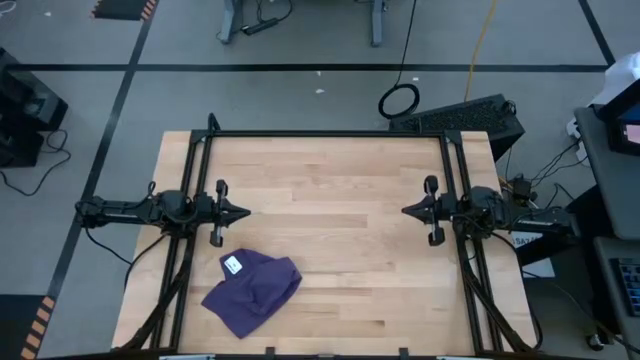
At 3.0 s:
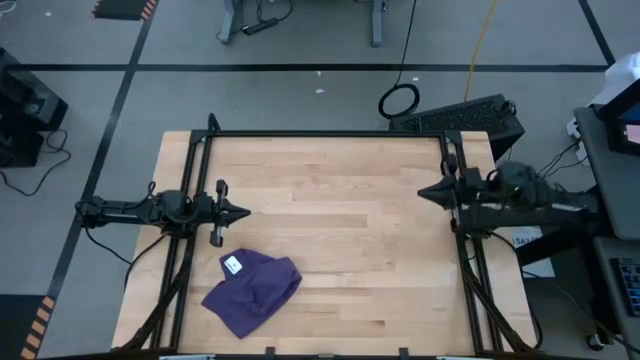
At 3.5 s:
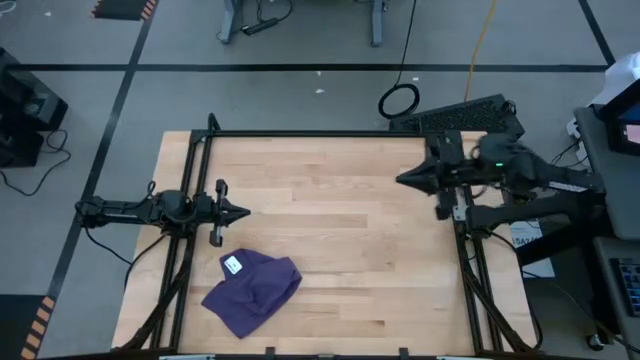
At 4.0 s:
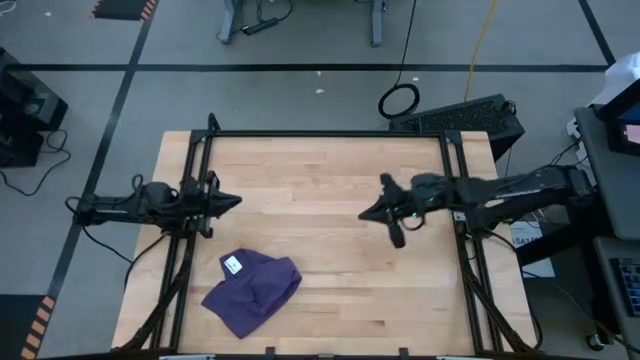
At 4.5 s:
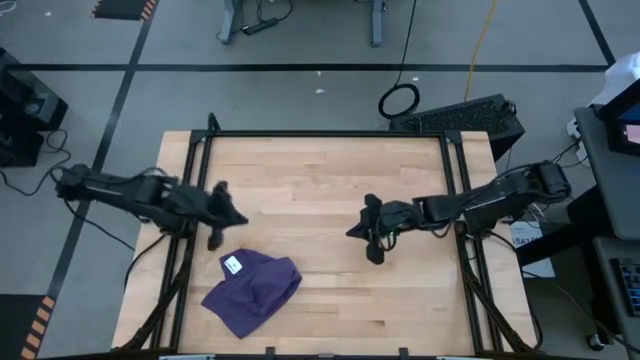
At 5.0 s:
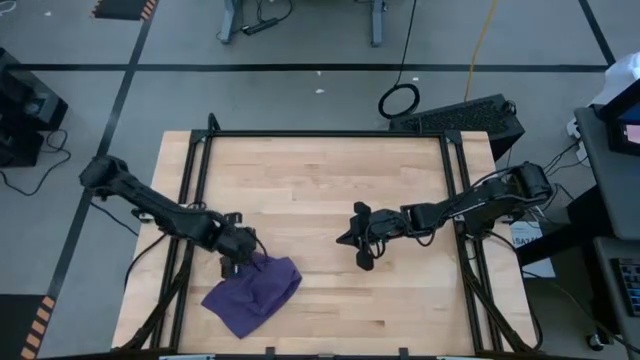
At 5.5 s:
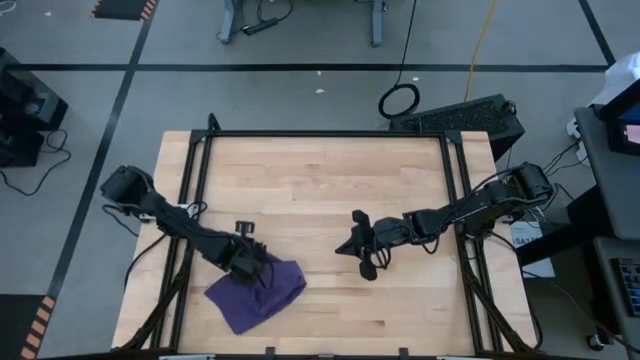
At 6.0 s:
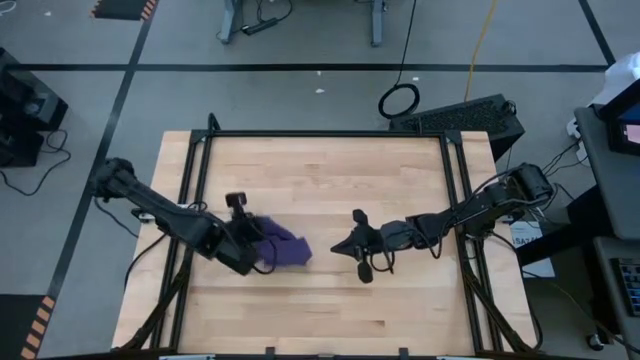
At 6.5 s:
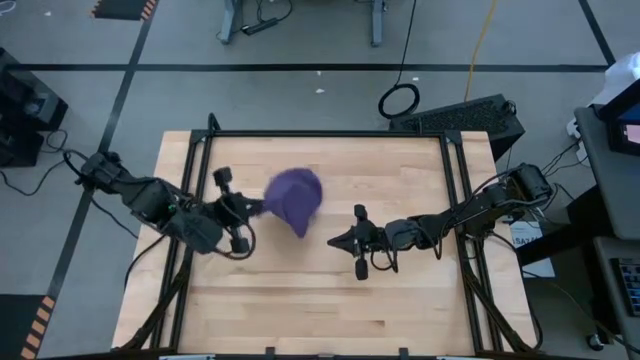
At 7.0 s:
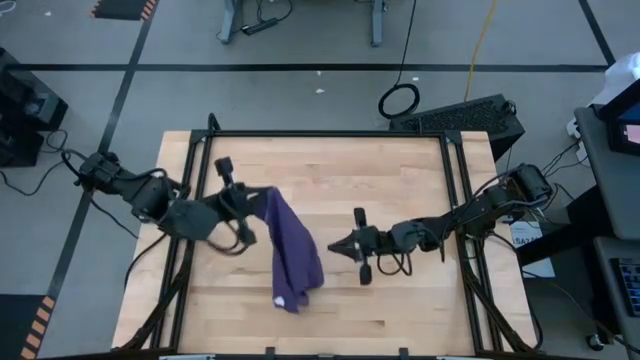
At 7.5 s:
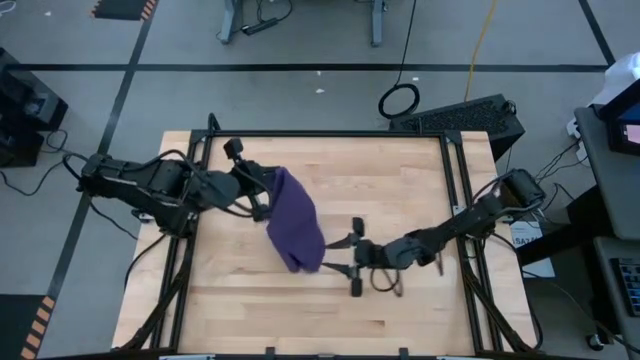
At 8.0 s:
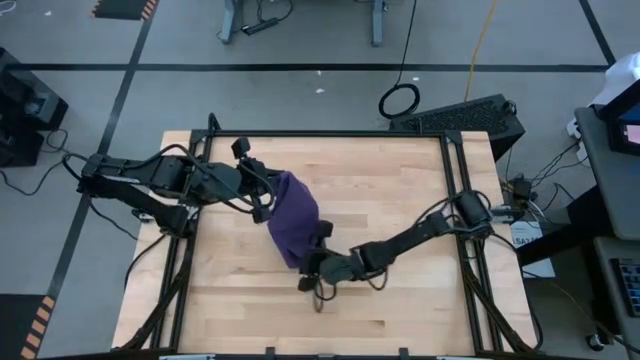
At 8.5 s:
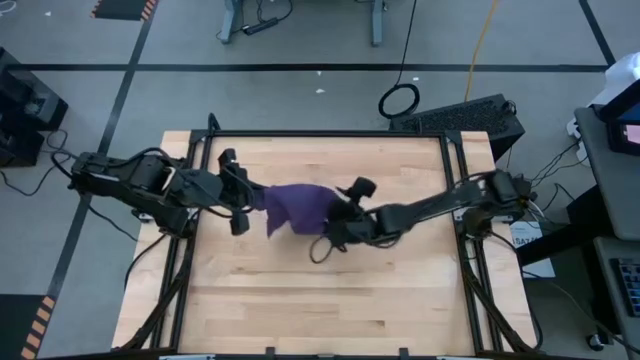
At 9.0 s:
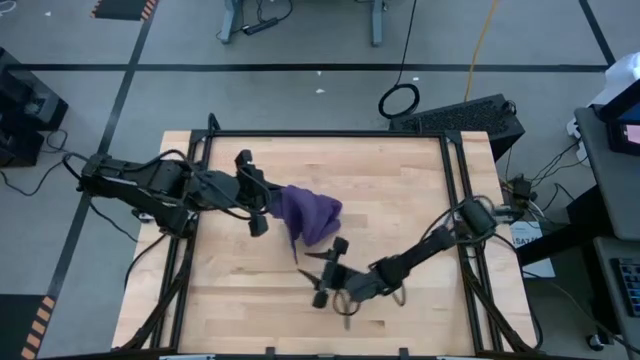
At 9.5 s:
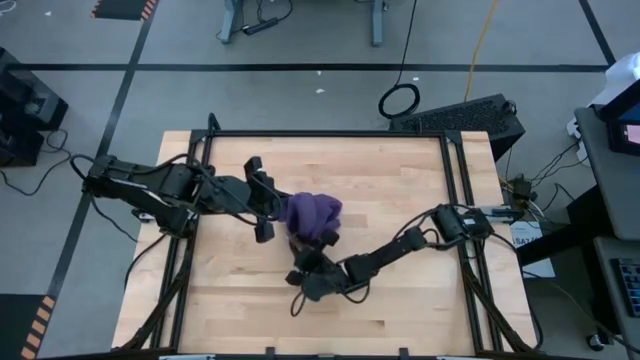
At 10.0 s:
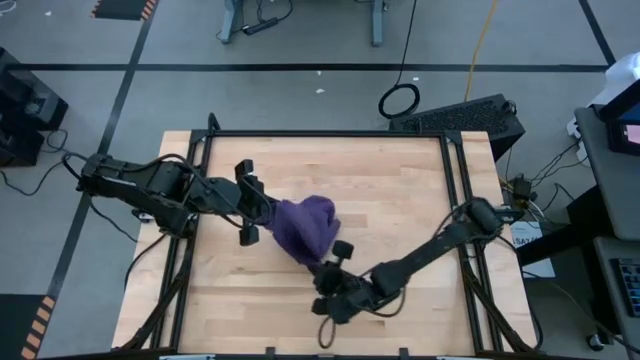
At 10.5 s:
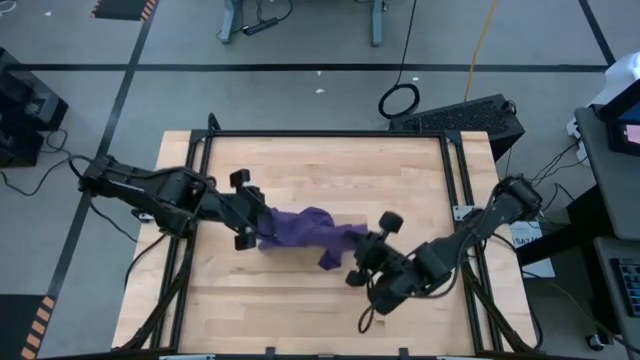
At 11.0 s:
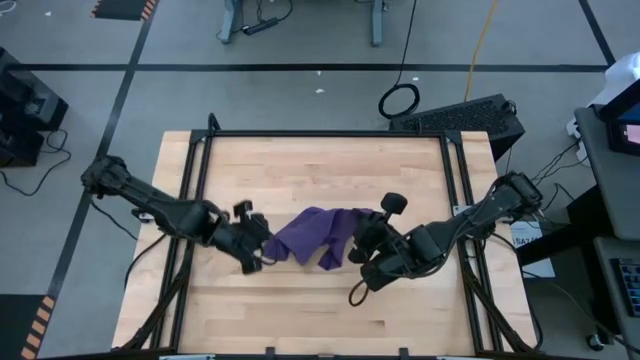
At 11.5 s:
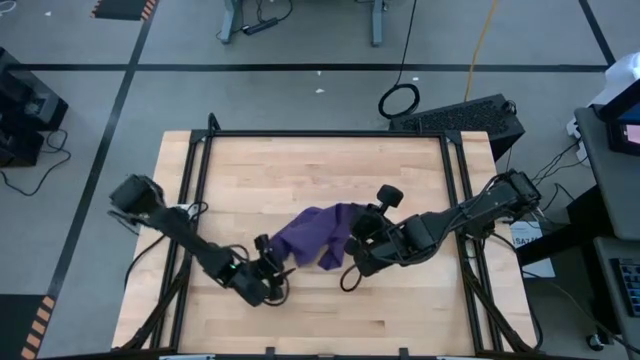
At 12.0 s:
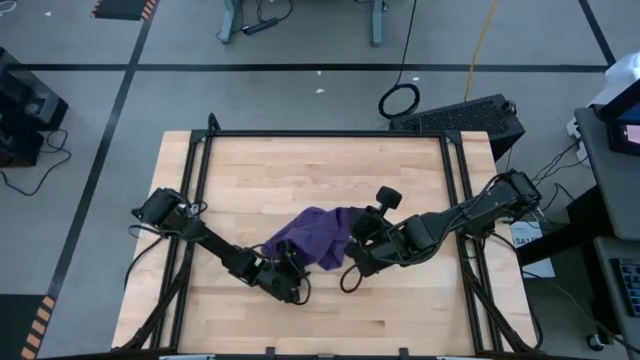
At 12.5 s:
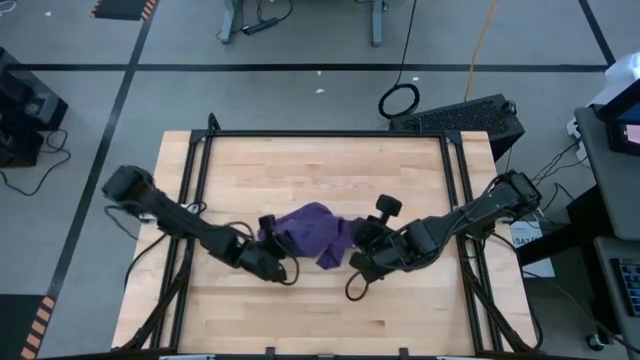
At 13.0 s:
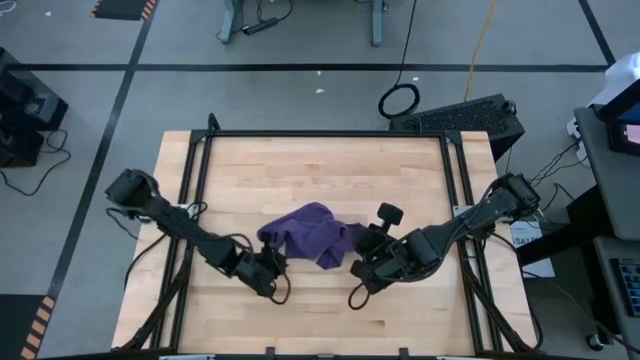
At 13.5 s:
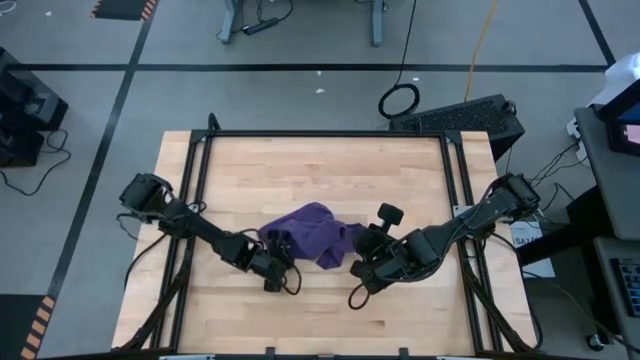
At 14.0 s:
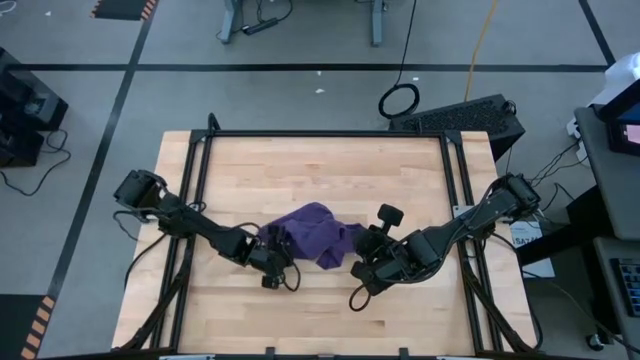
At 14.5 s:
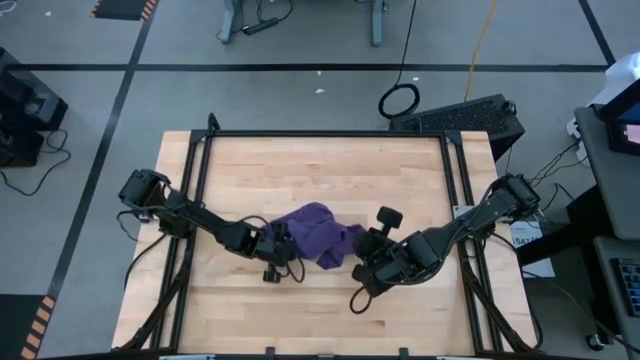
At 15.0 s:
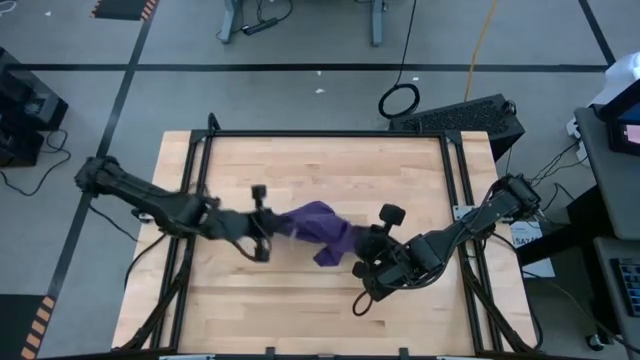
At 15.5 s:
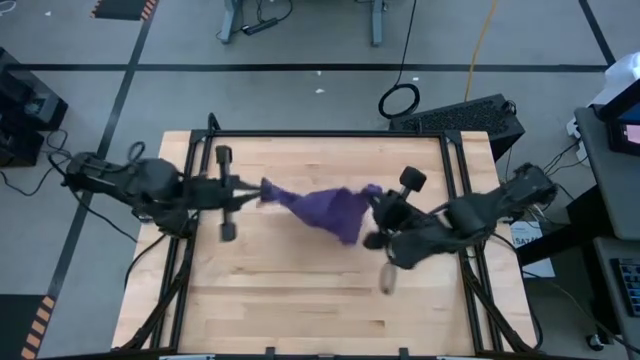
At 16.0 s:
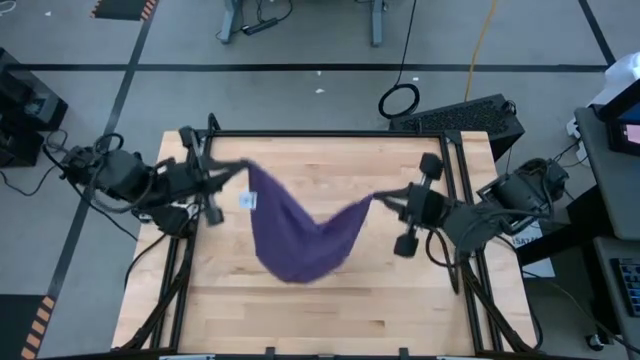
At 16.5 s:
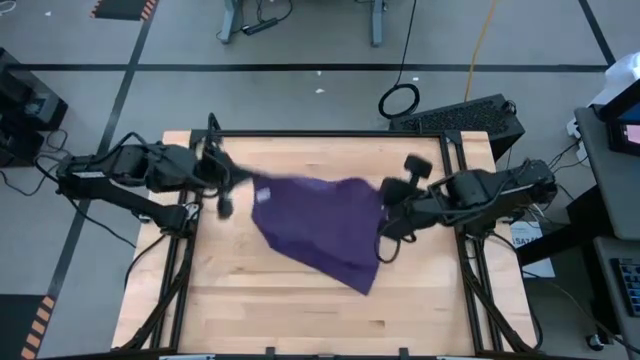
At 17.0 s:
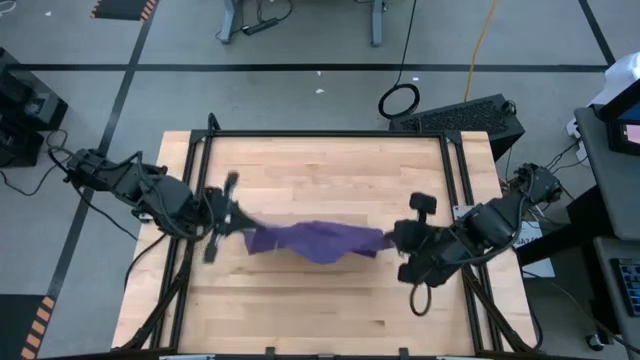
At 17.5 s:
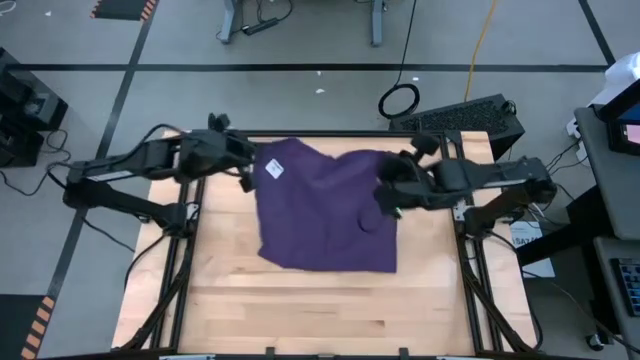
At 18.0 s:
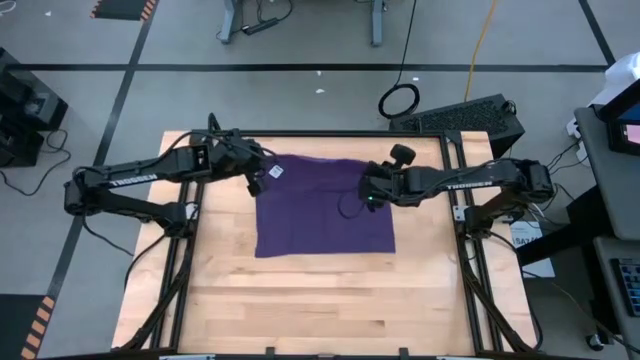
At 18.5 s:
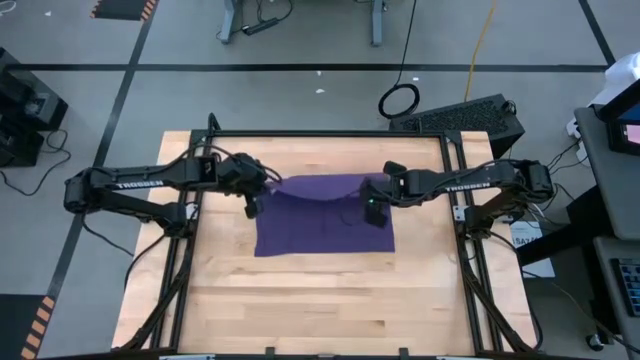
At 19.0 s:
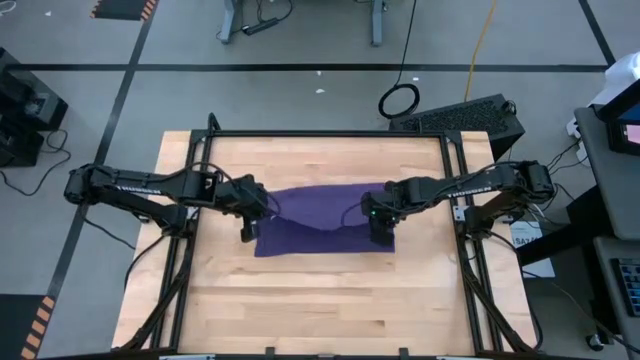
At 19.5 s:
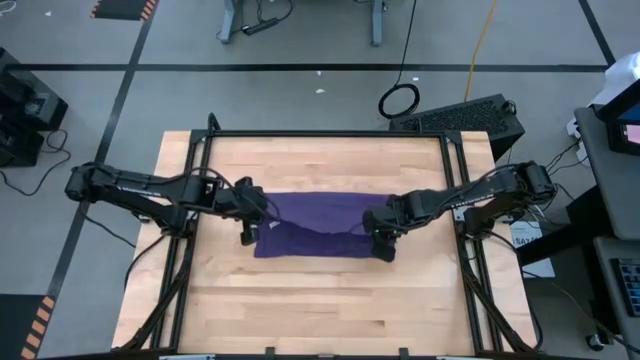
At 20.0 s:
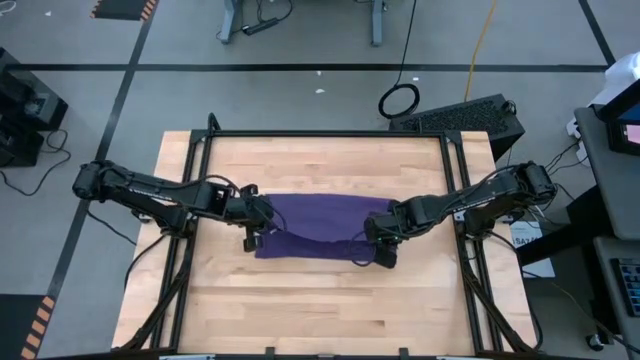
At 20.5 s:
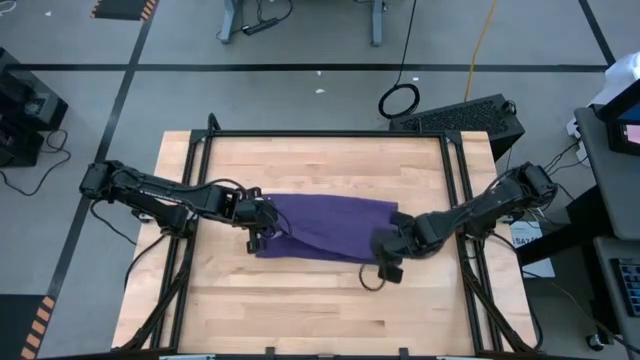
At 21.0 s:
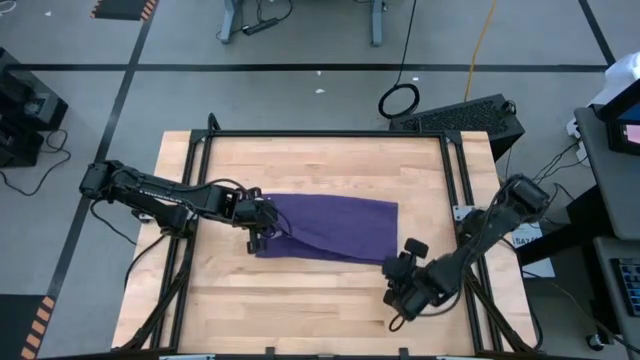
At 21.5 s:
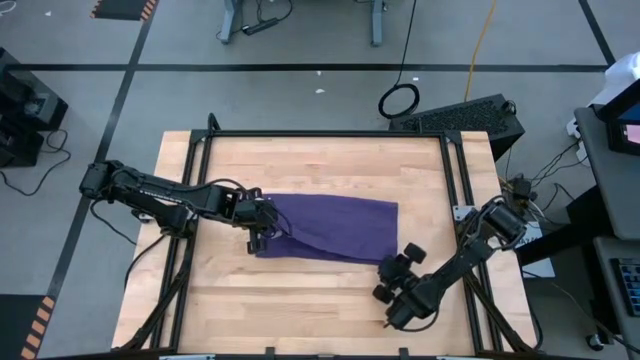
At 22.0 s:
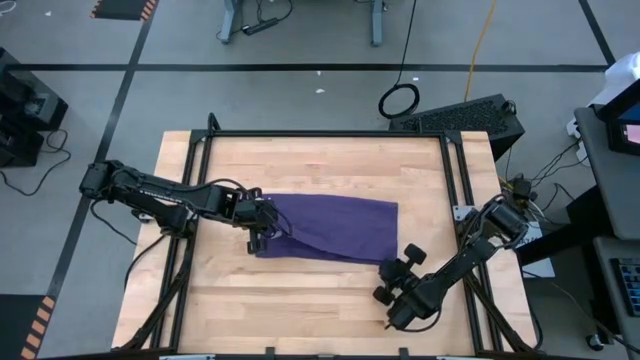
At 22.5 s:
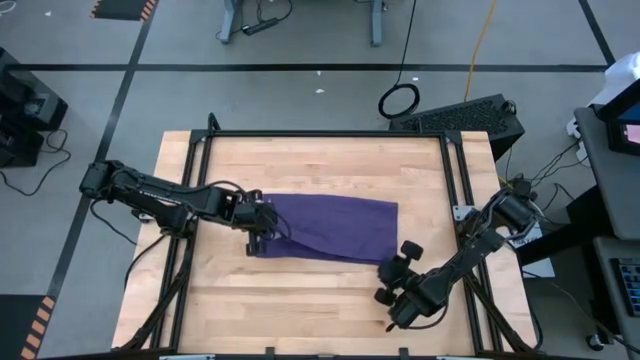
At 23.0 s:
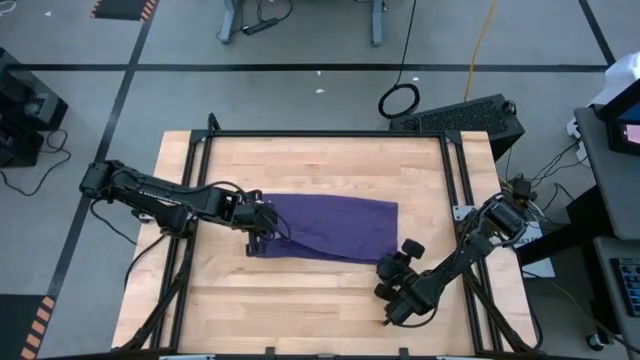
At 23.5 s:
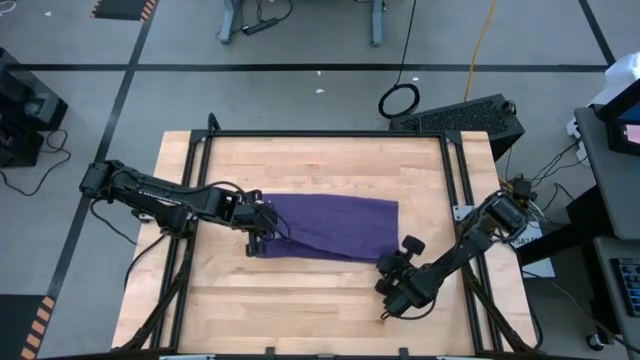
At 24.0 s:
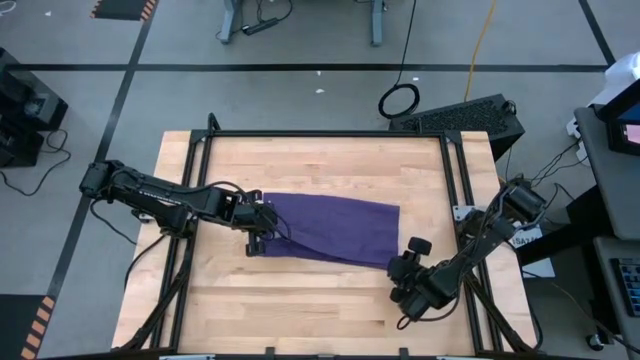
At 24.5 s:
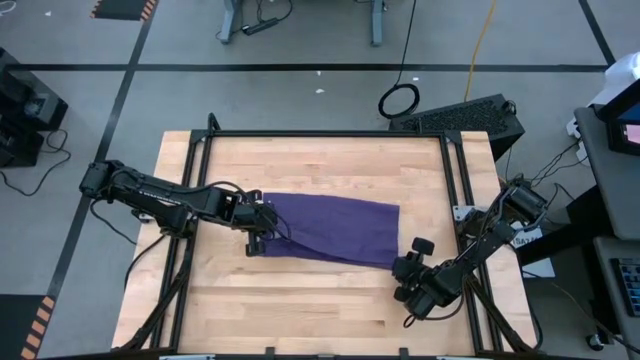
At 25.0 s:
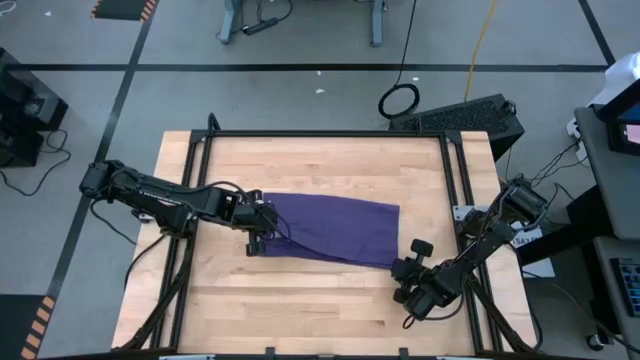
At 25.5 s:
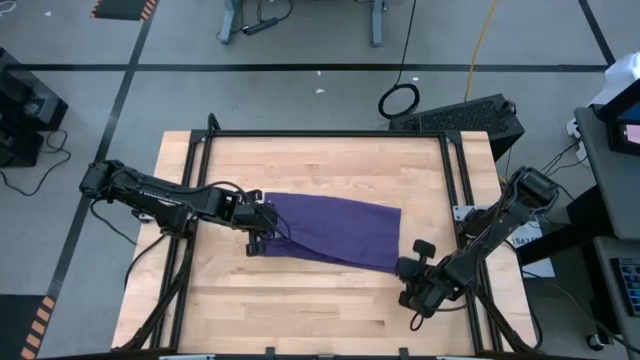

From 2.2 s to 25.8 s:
Task: Roll towel into tight, uniform cylinder
Fold the purple towel on the table
